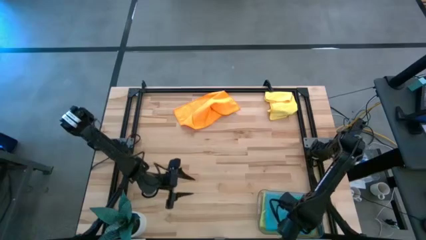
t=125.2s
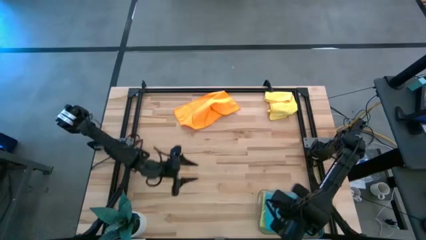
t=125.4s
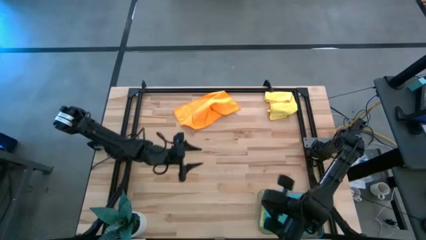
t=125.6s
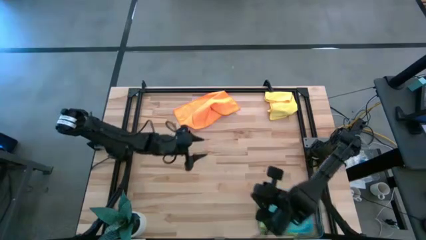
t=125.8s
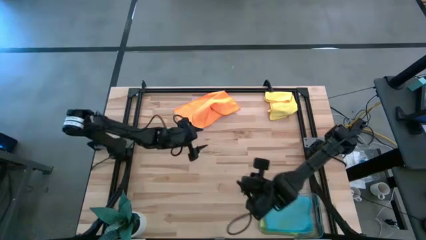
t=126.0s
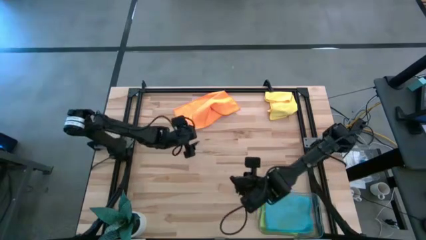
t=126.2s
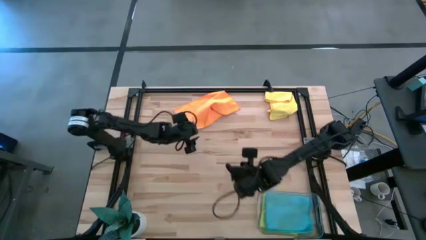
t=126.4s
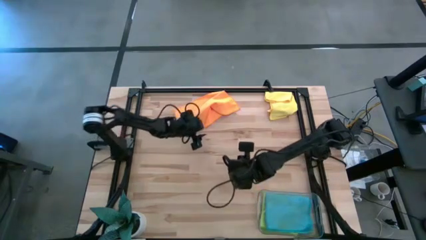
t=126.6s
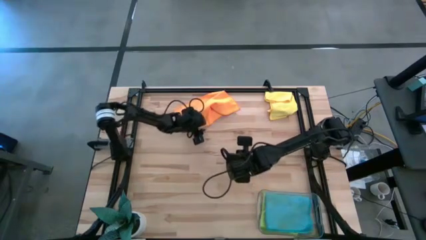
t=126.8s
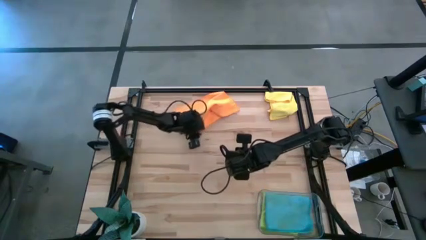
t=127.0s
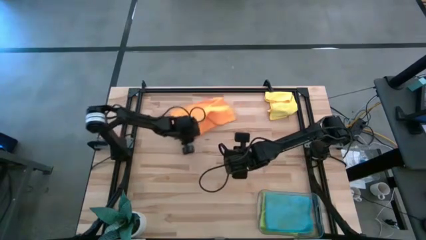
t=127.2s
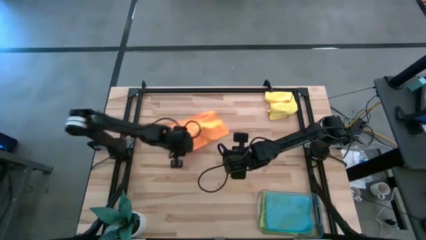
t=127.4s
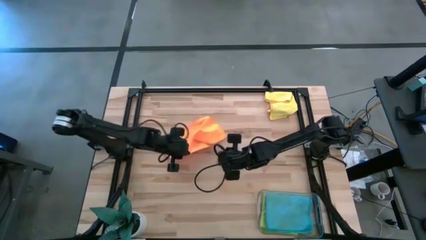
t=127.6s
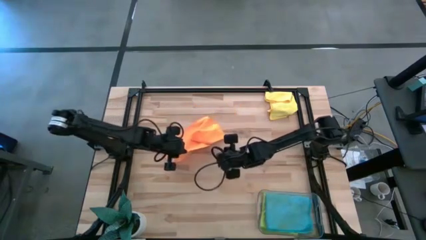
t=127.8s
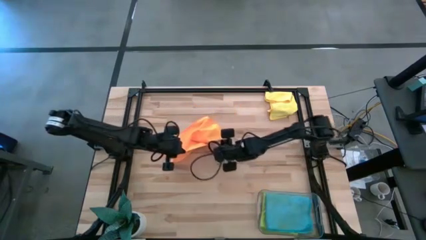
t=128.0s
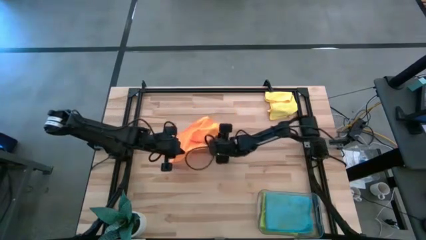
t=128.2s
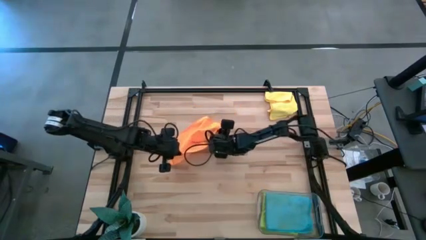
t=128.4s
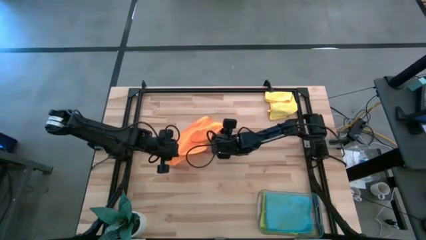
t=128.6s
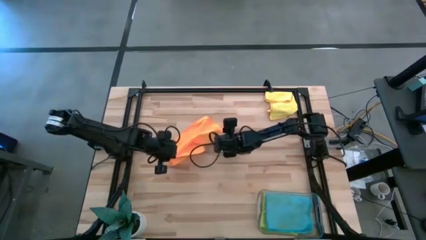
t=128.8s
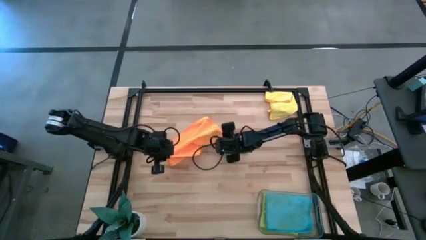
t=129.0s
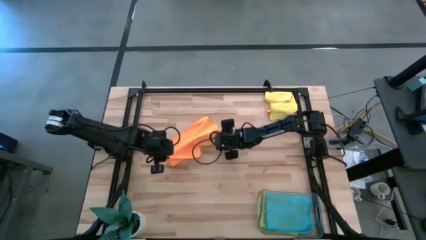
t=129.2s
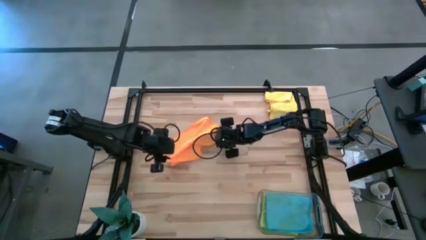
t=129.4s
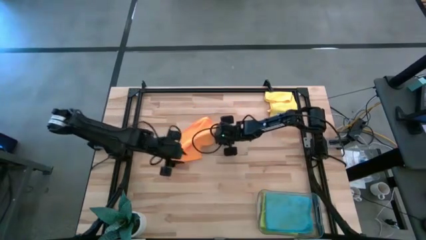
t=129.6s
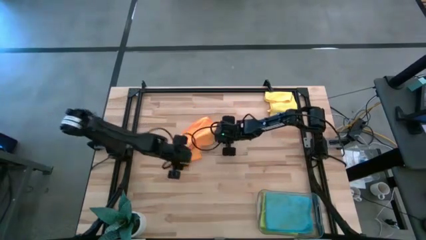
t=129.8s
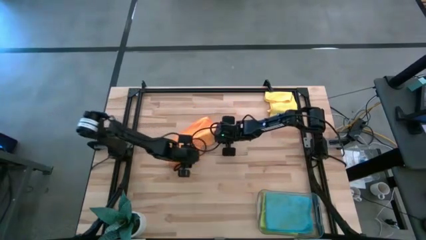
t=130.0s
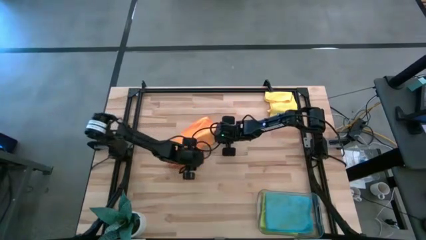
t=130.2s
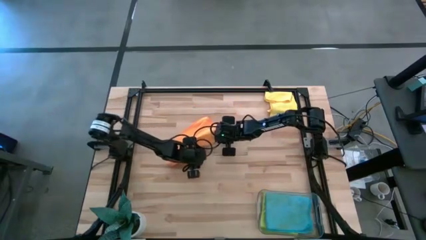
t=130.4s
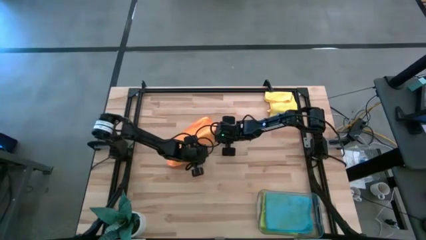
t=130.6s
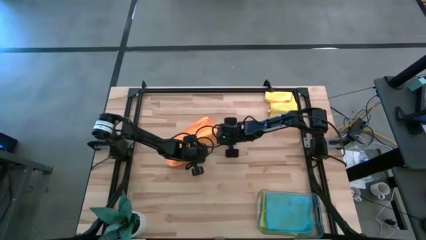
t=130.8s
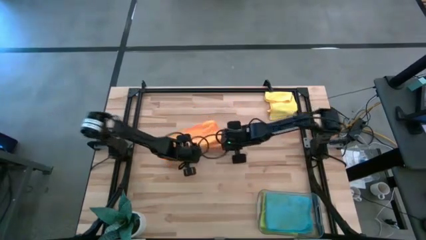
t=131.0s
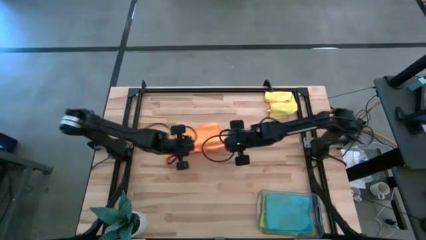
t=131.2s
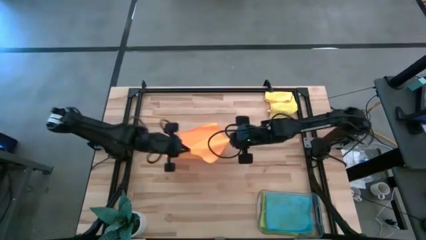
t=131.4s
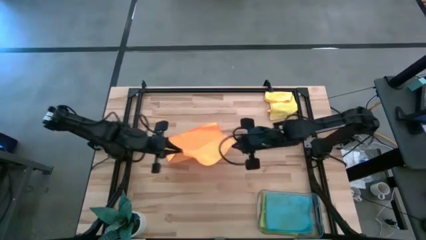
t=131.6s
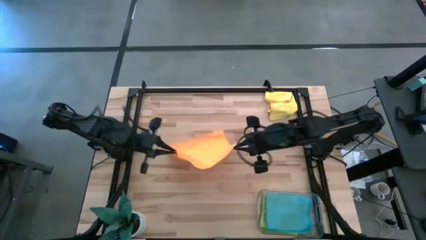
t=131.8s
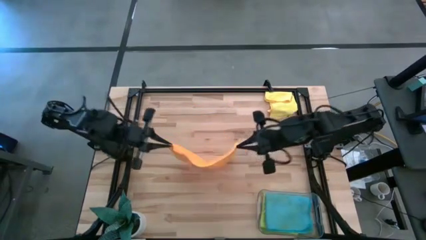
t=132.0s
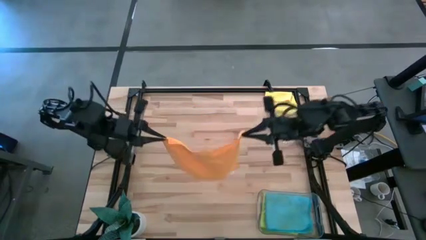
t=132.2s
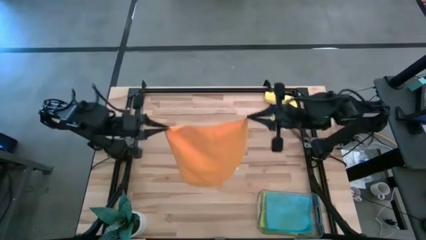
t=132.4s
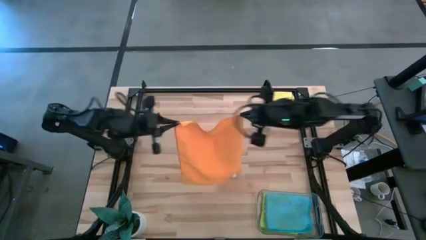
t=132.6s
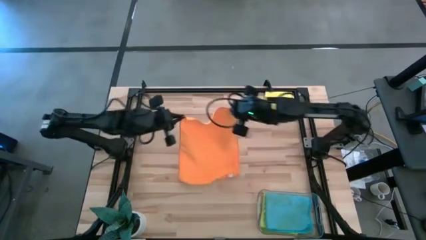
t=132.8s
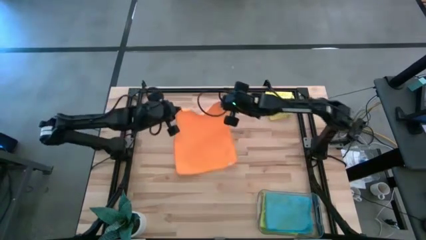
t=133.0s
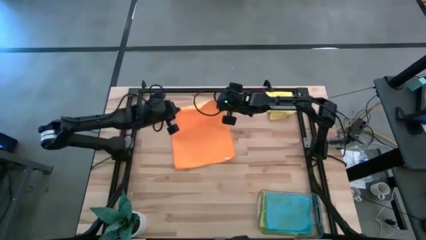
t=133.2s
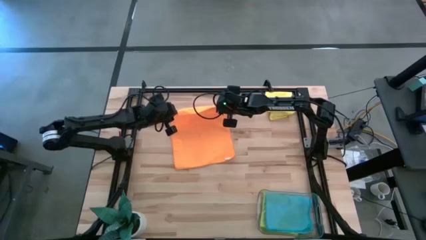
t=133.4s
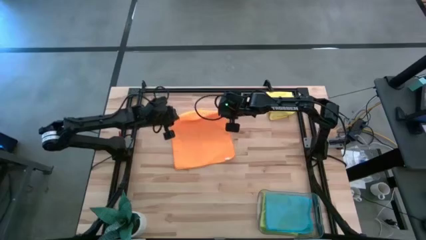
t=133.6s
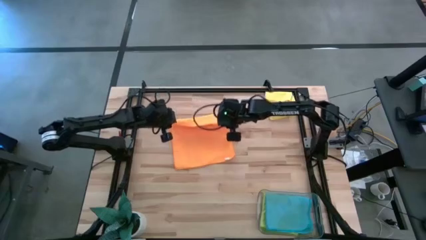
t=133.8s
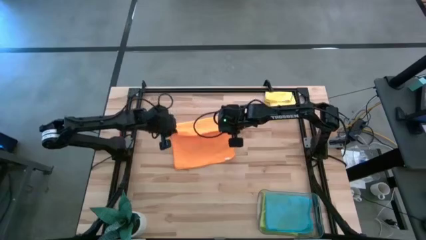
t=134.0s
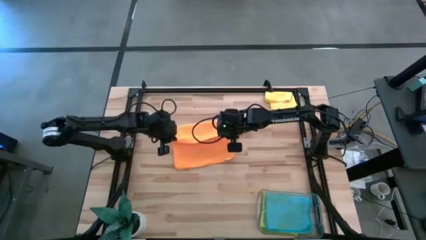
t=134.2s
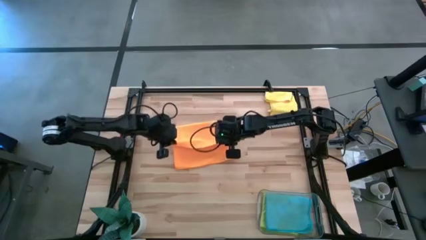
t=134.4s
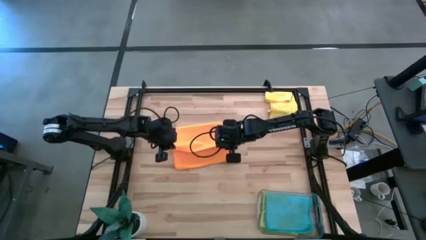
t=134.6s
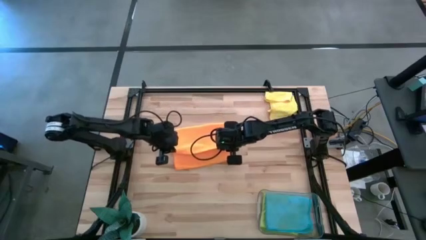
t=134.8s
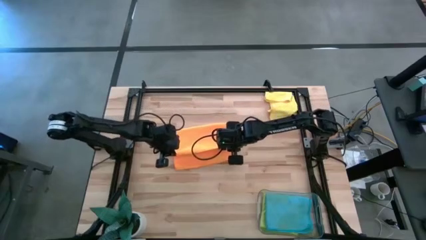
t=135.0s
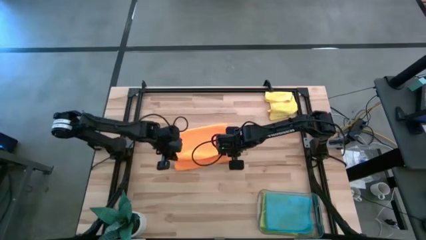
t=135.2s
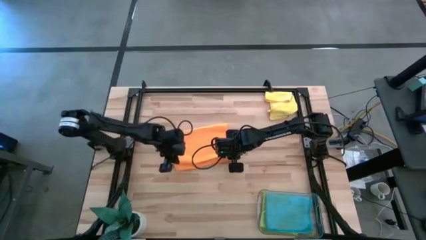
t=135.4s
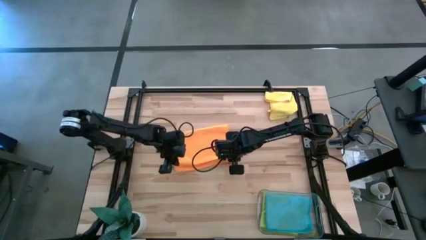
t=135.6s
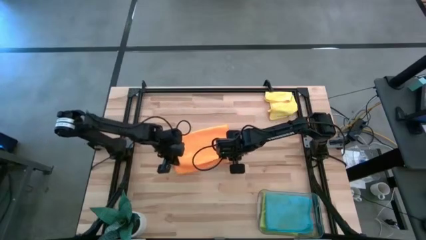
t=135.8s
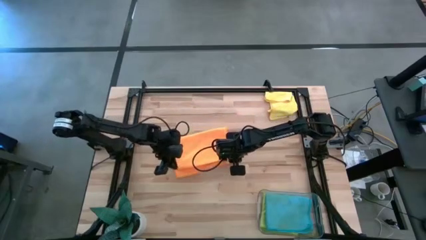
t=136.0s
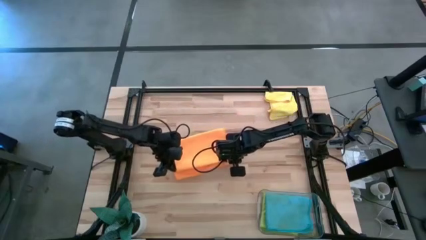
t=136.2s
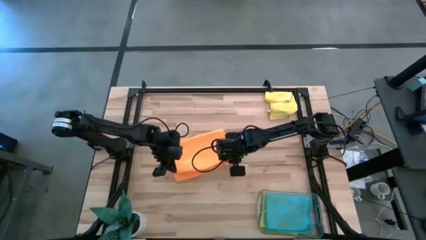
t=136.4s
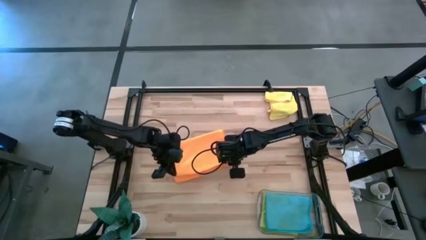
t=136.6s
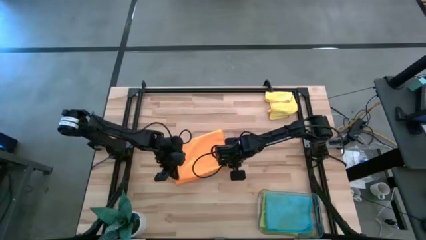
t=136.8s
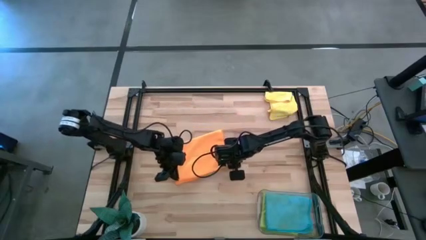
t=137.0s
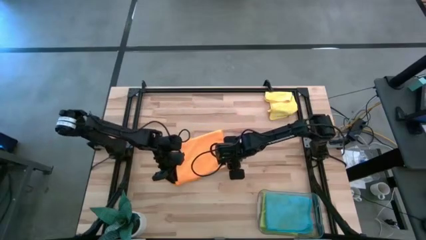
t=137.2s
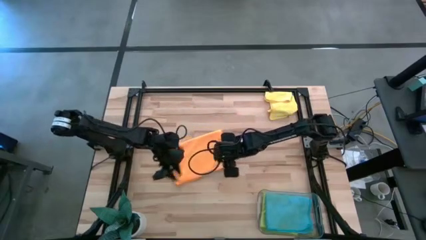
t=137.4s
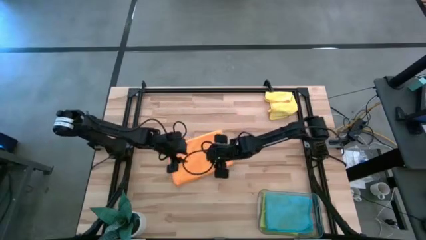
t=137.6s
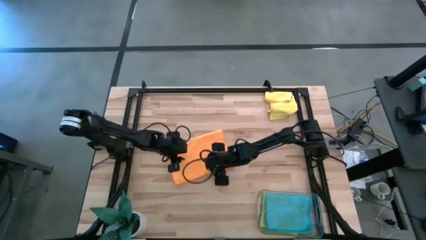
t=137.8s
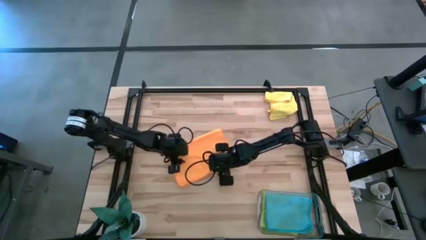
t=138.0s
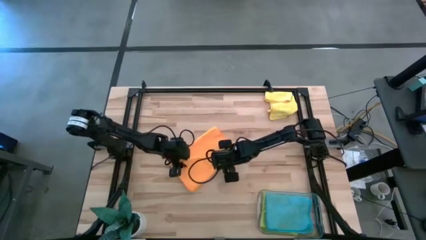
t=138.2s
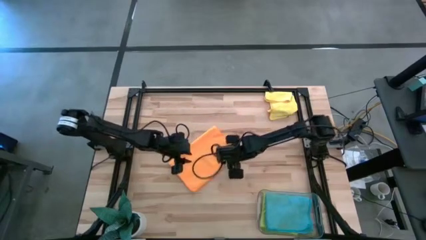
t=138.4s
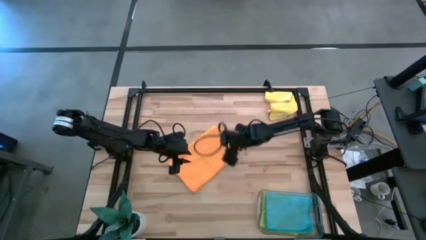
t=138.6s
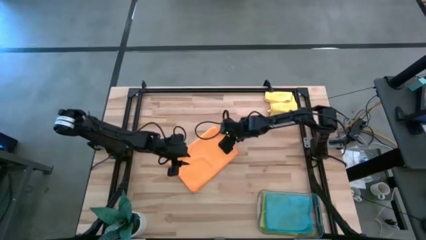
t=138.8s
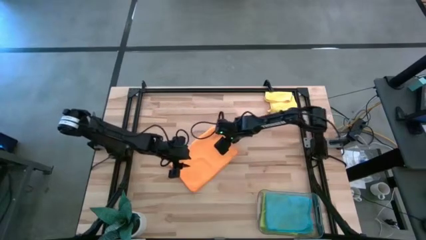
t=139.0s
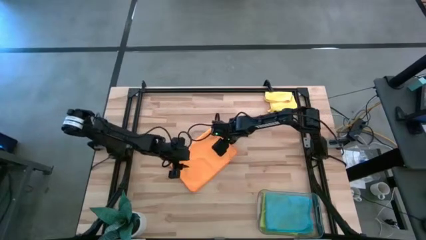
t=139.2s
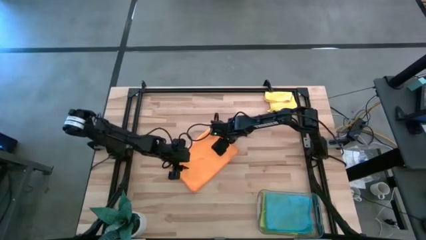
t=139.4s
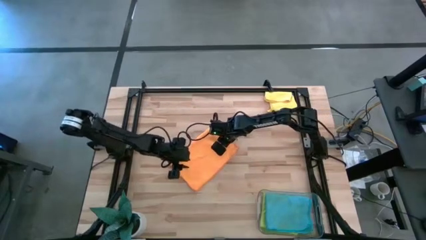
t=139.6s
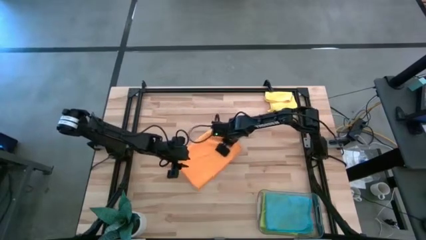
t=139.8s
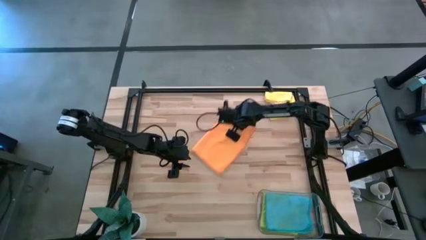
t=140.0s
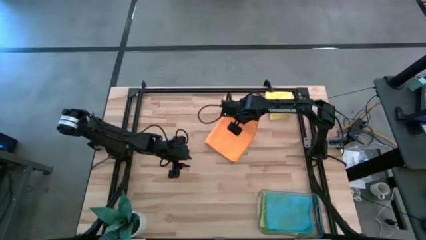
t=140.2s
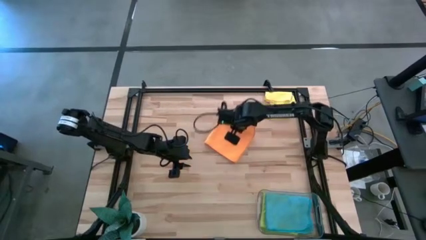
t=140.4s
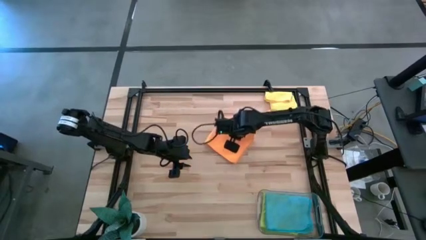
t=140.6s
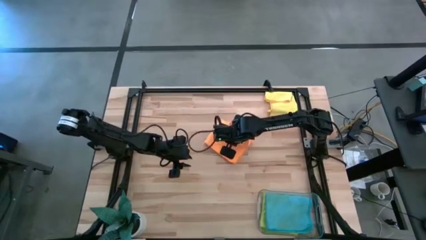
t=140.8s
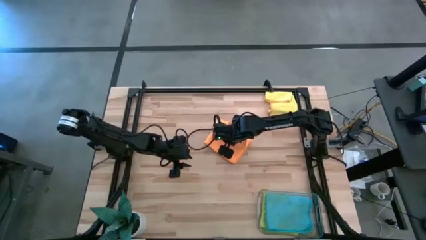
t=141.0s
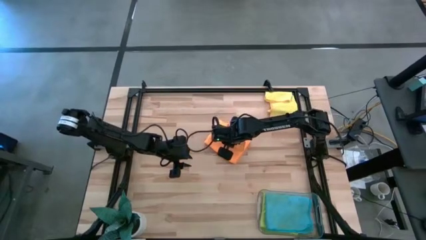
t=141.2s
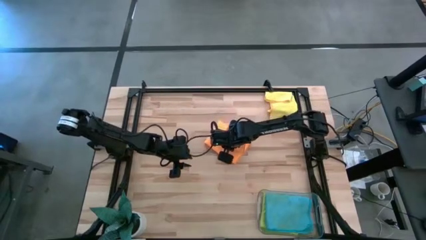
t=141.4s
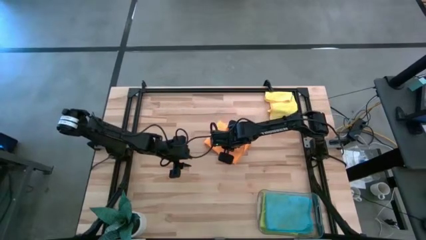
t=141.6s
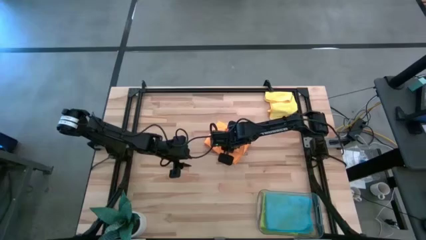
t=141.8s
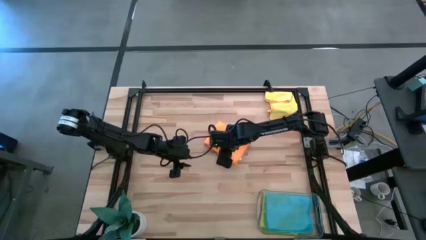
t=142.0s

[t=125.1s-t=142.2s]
Task: Fold microfiber towels
Fold the orange microfiber towel
